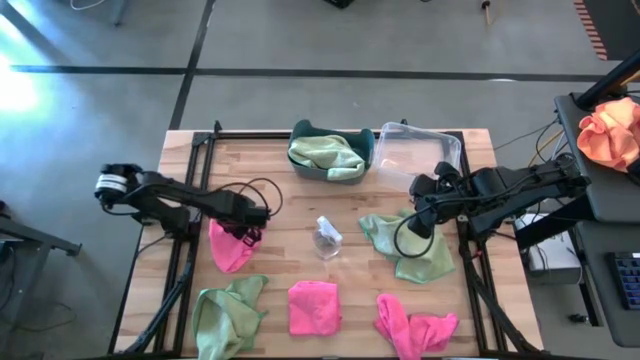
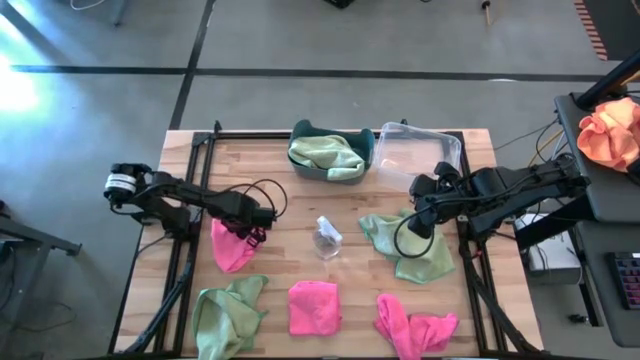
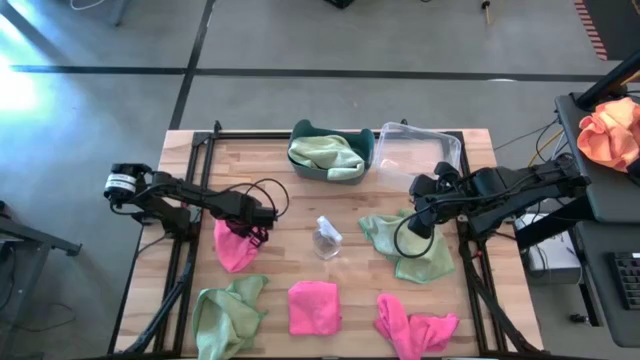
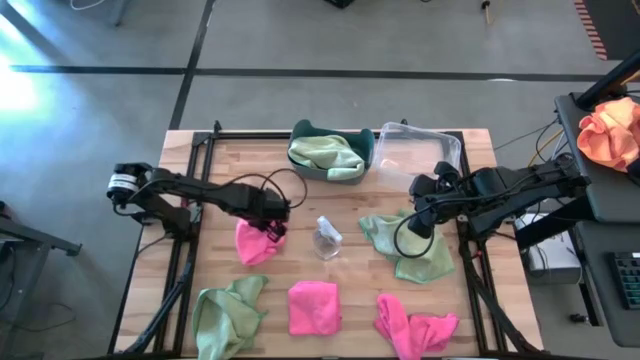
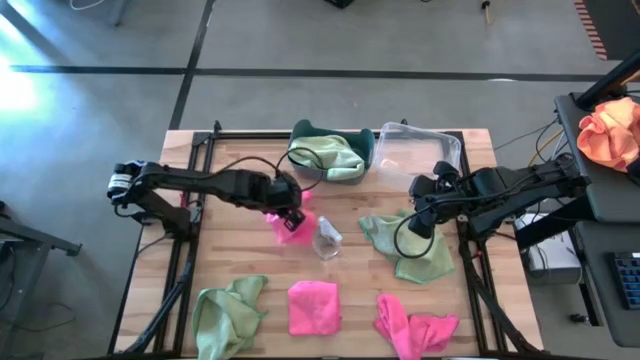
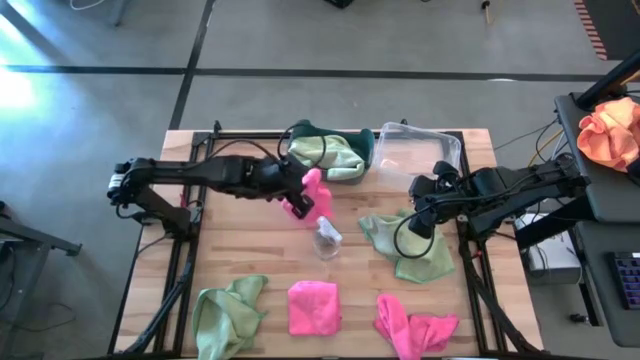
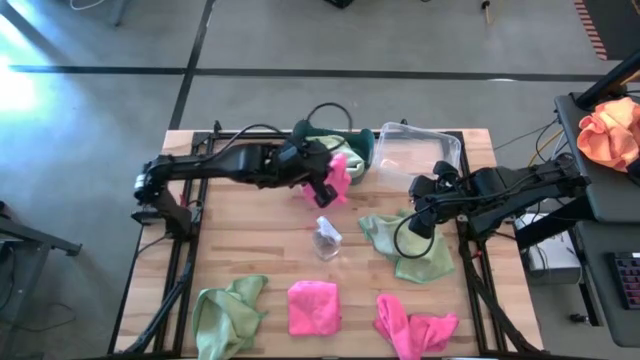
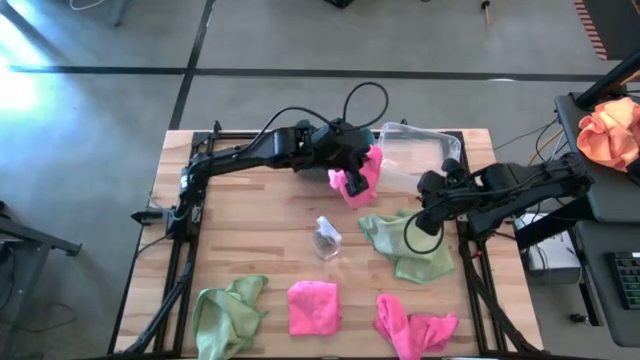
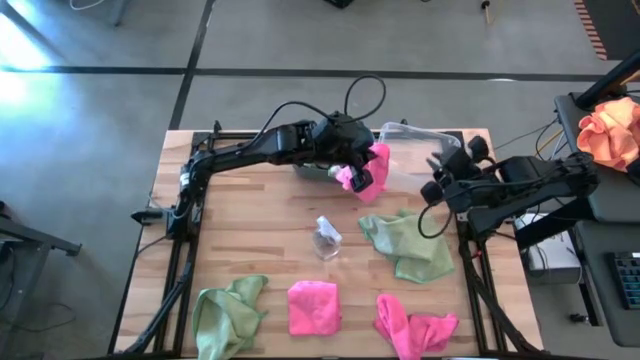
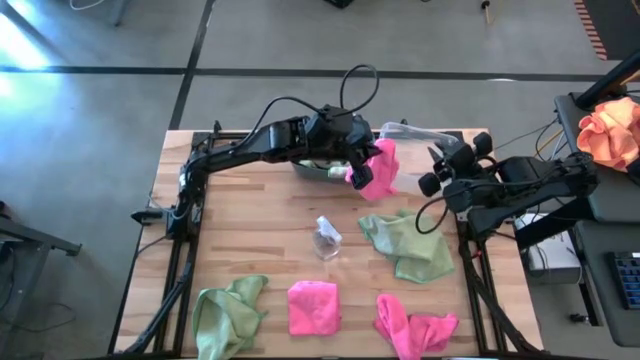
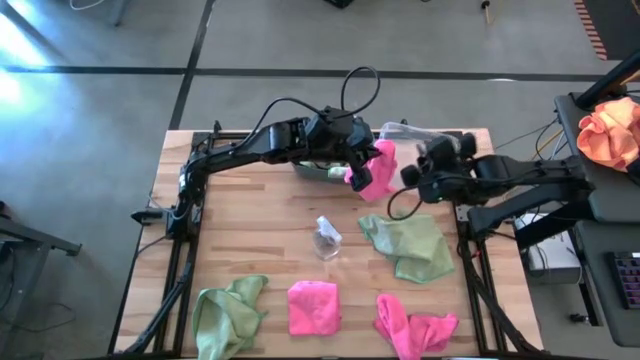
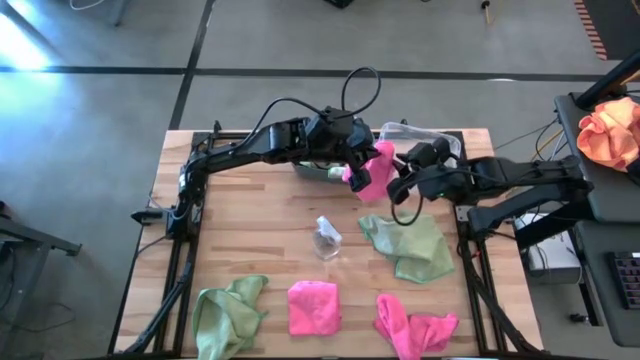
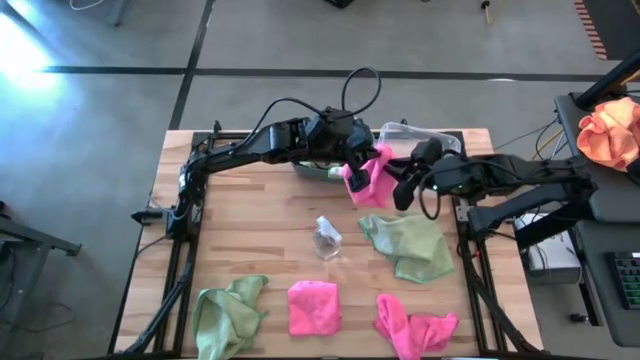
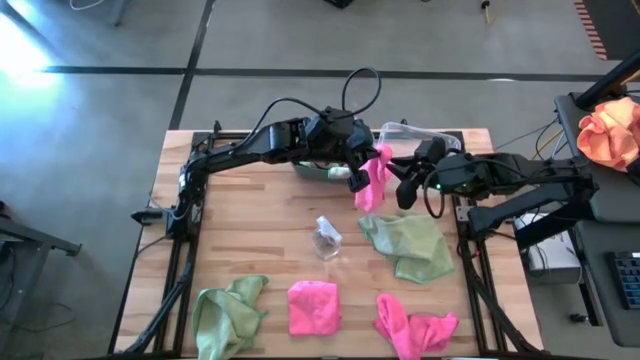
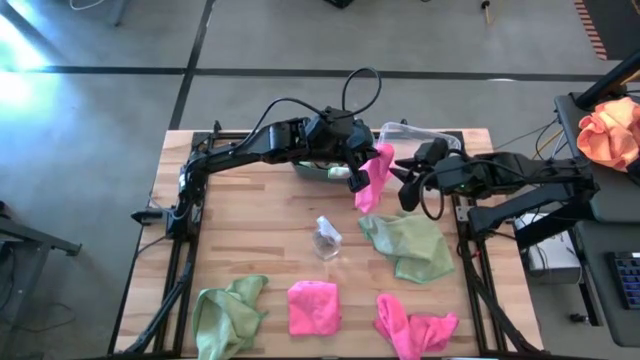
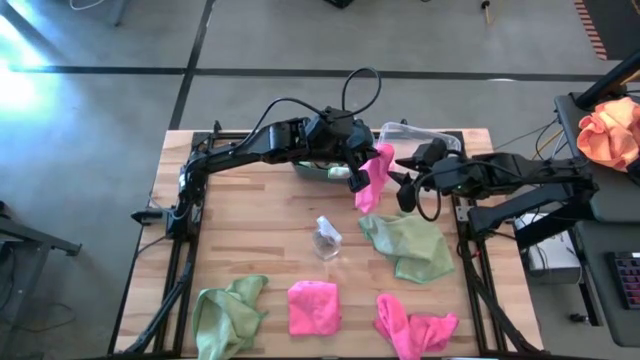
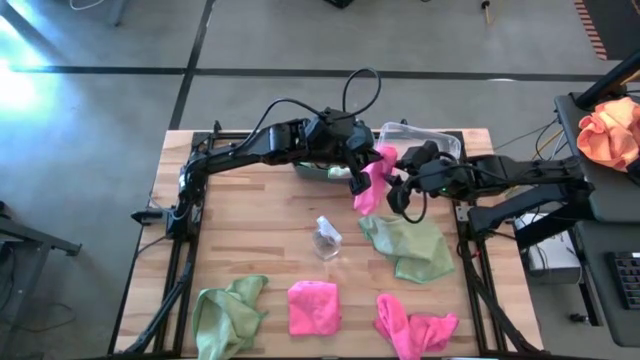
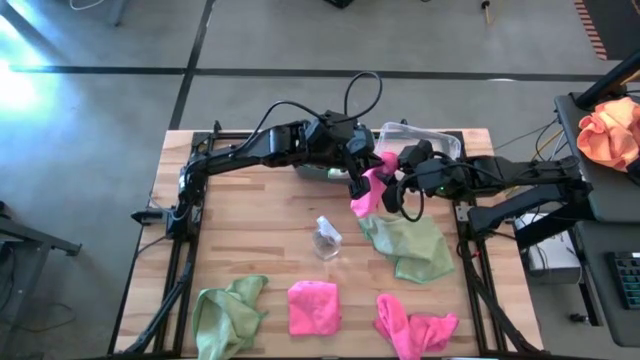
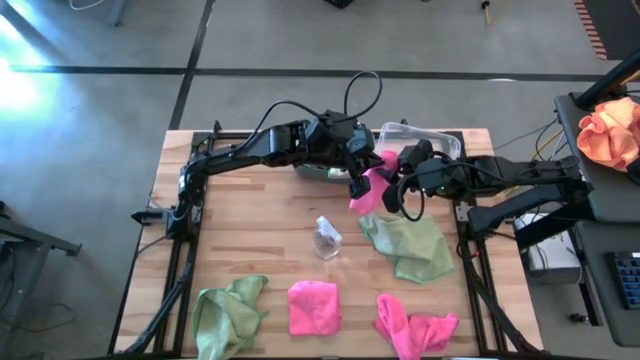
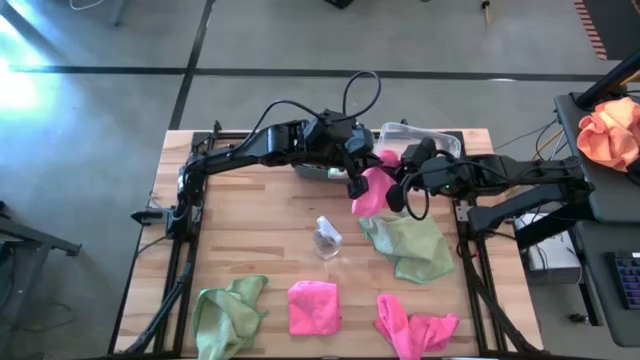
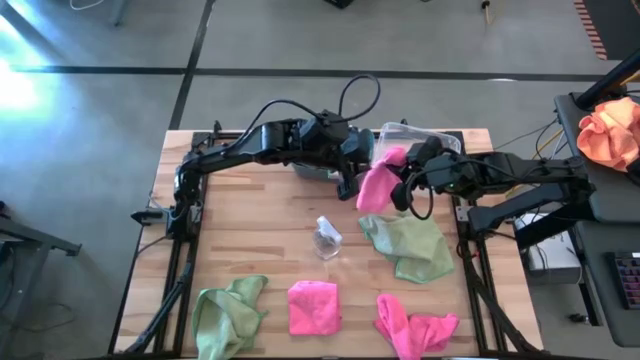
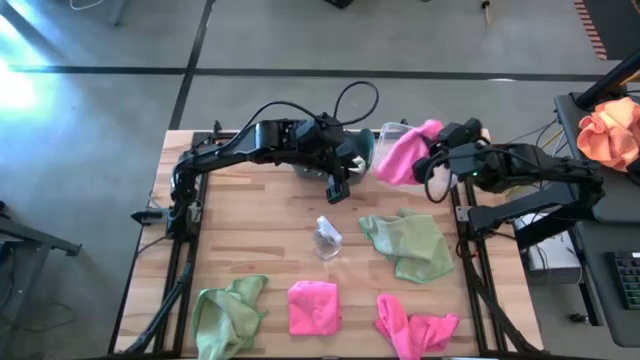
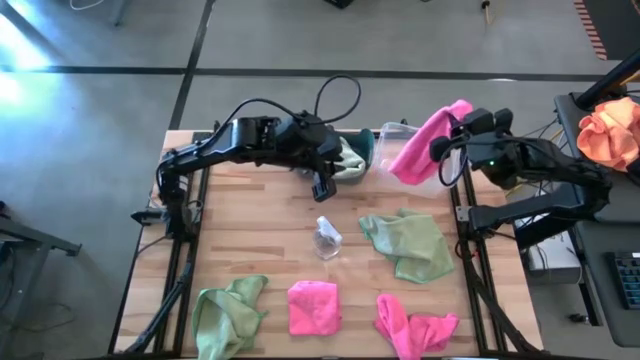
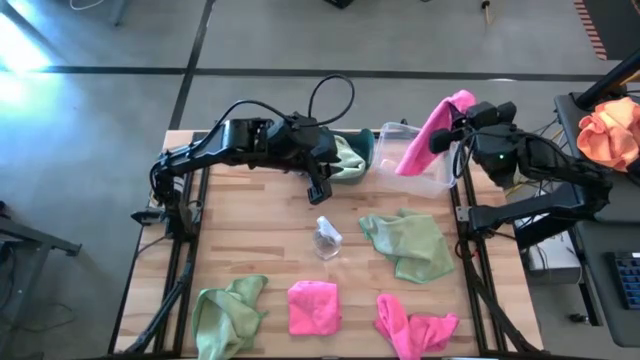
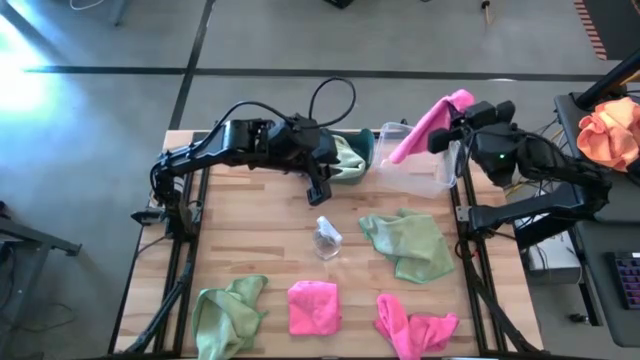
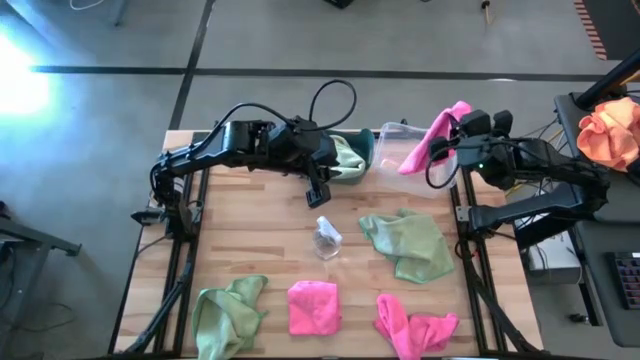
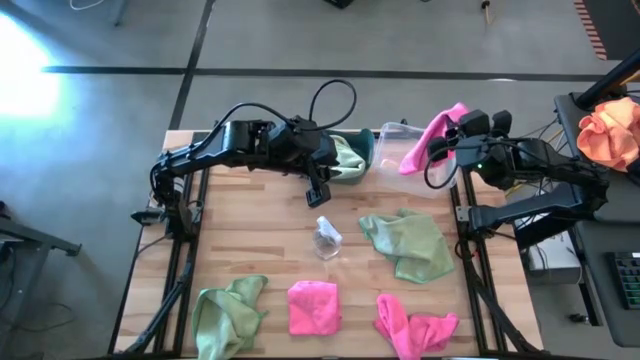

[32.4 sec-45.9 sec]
Task: Sort microfiber towel by color & place in baskets
Put the left pink microfiber cloth into the transparent bin

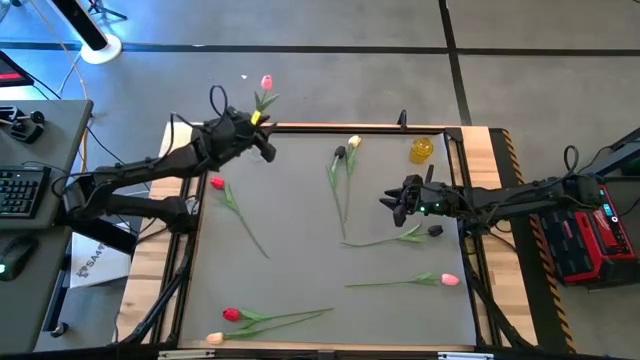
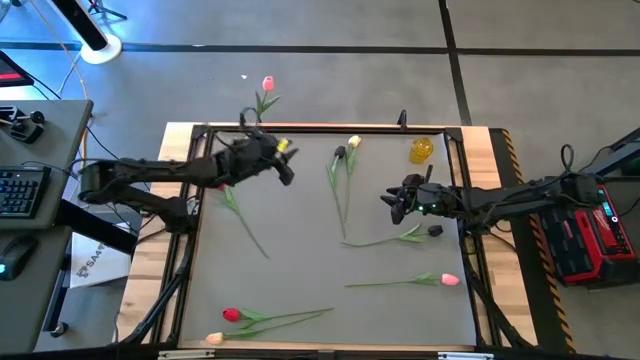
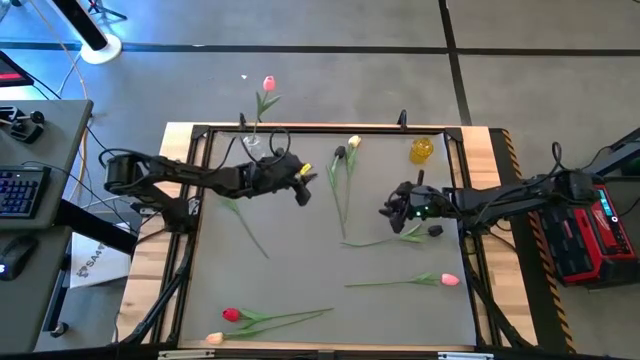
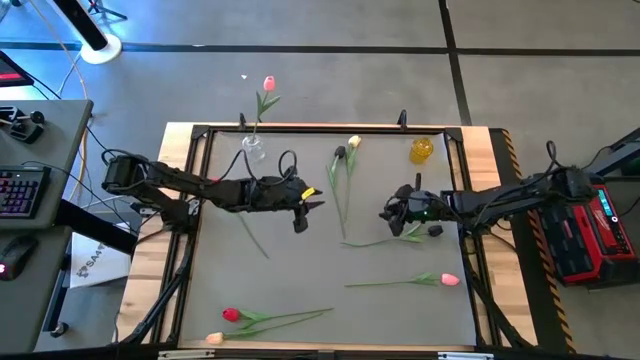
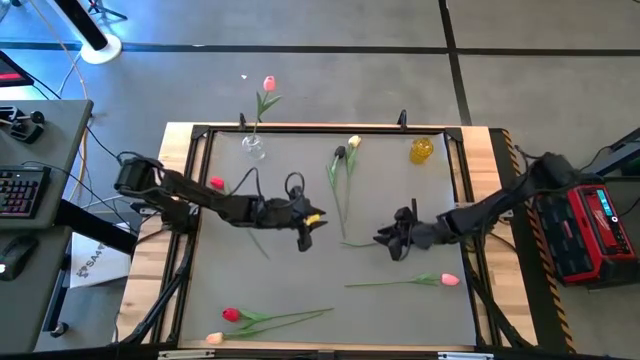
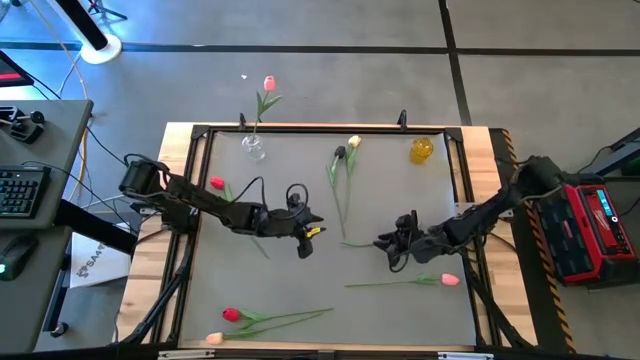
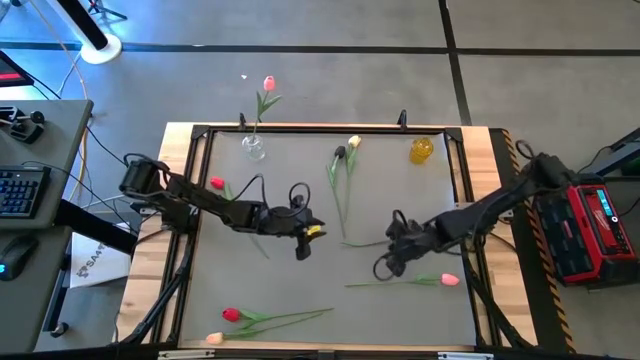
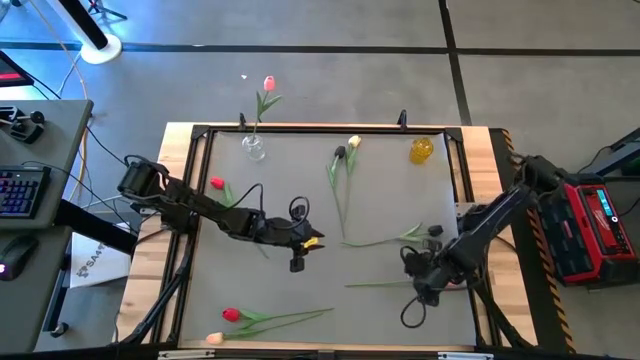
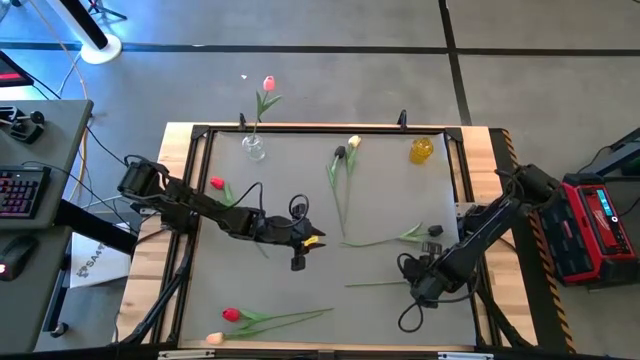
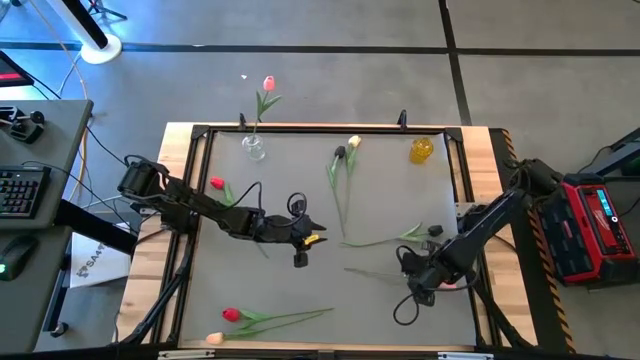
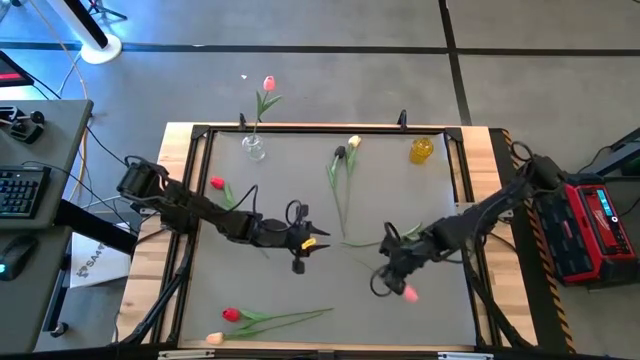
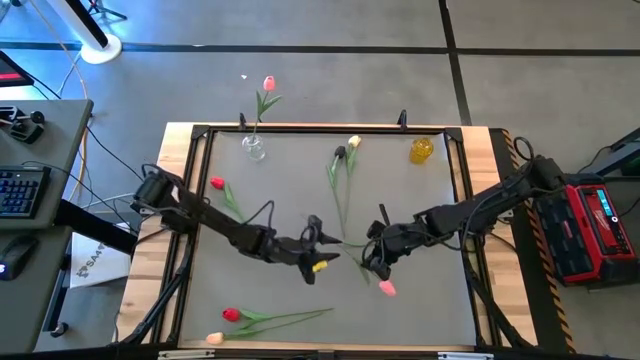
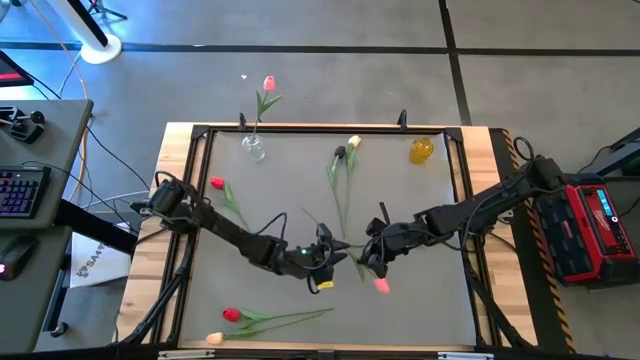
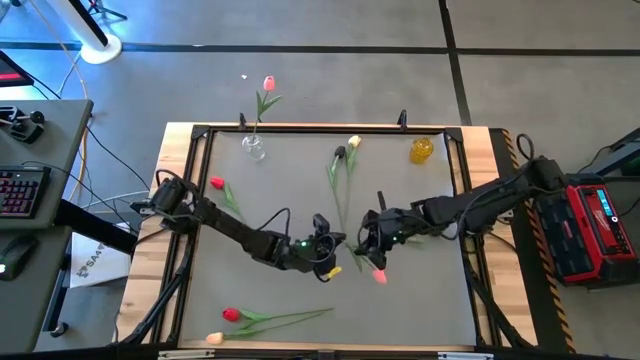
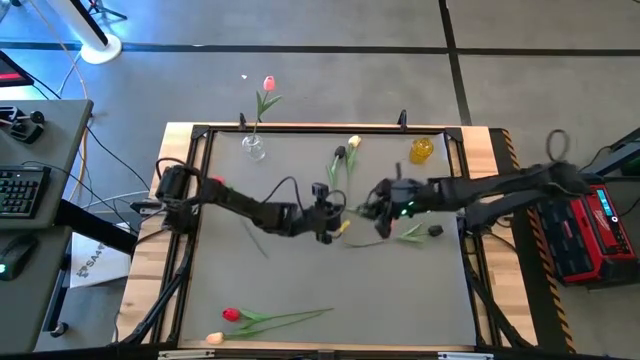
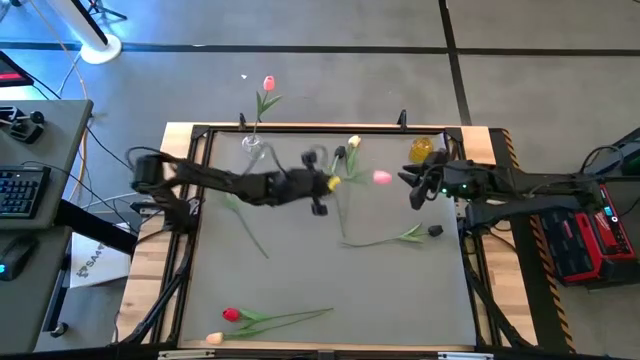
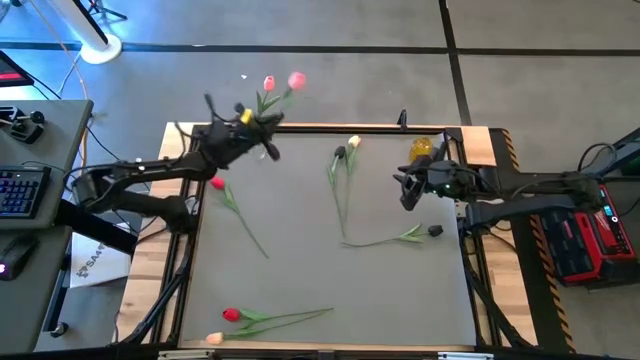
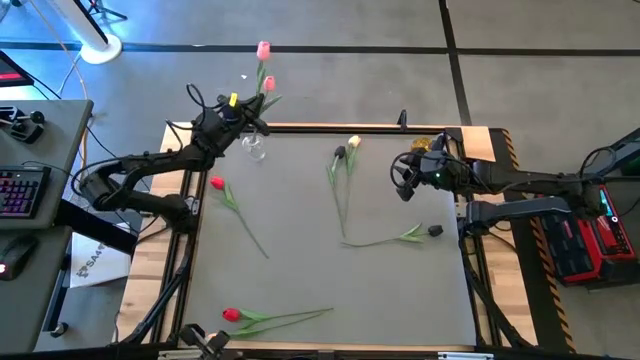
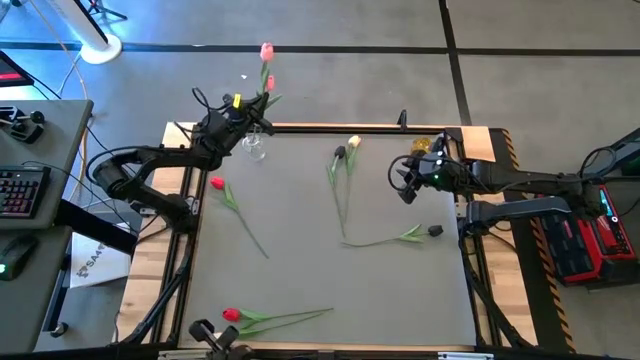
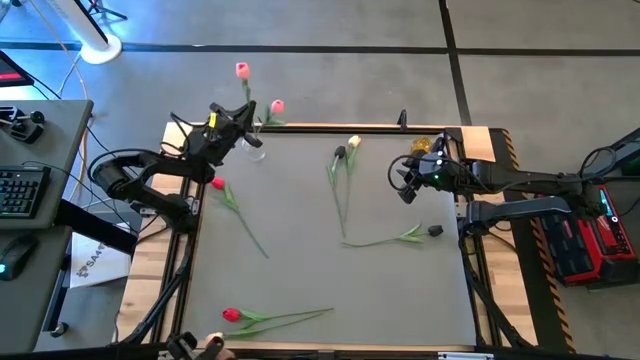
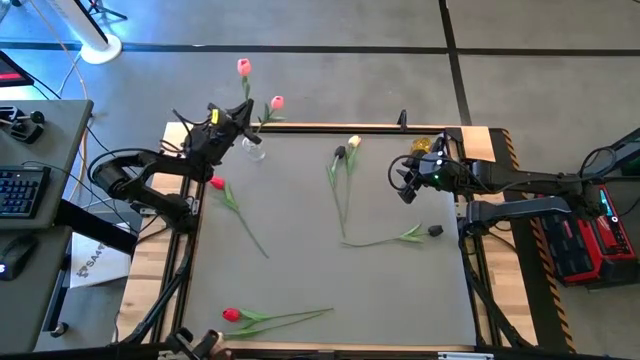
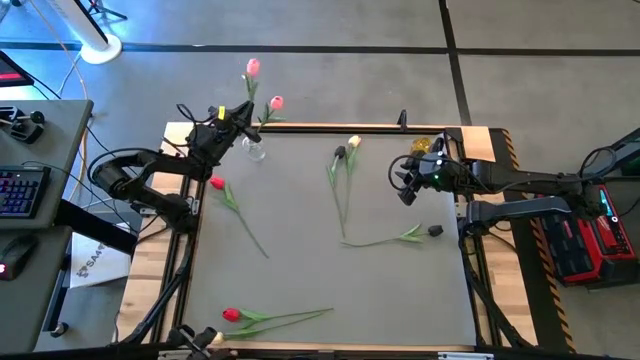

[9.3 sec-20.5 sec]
Task: Sort flowers into vase by color
Put the pink flower into the transparent vase
